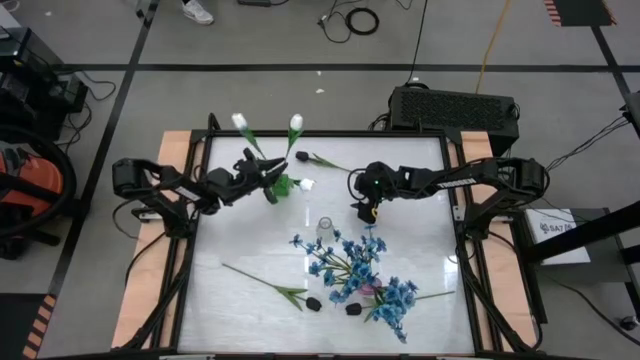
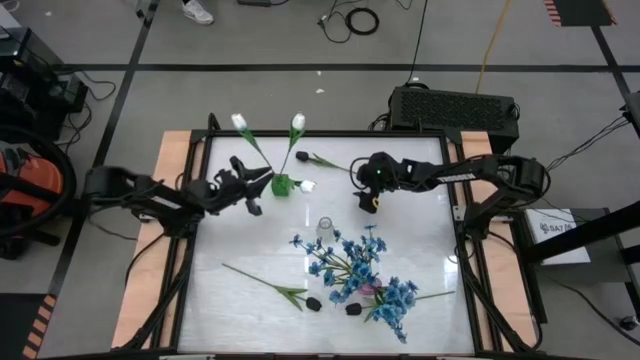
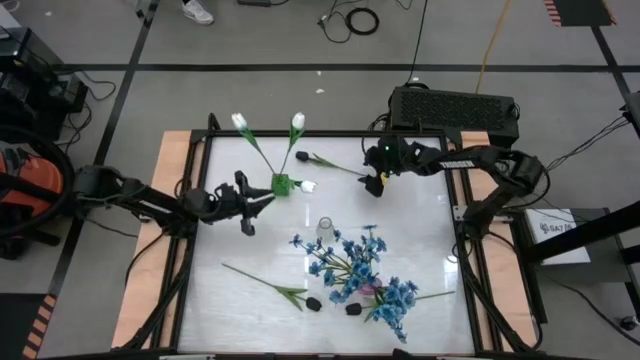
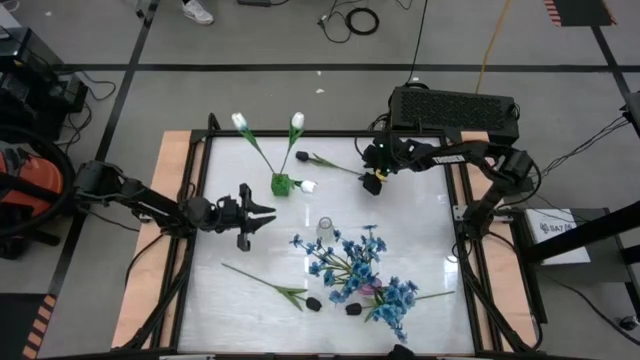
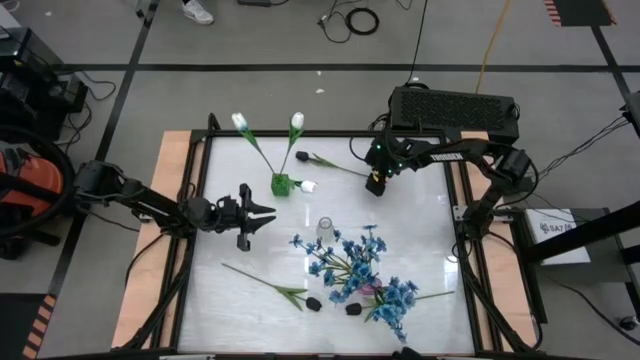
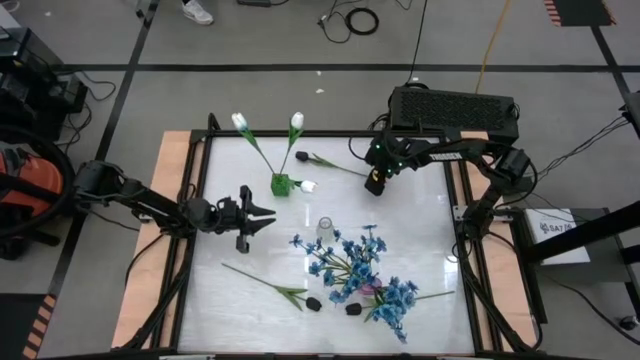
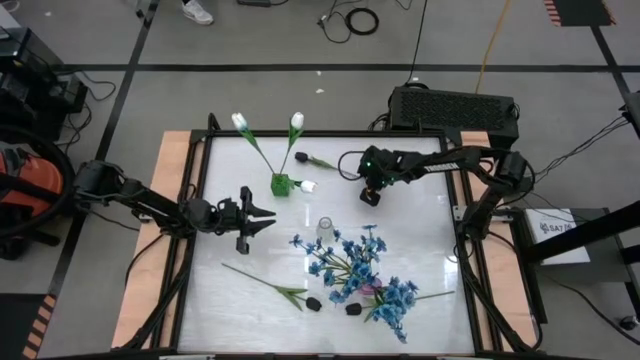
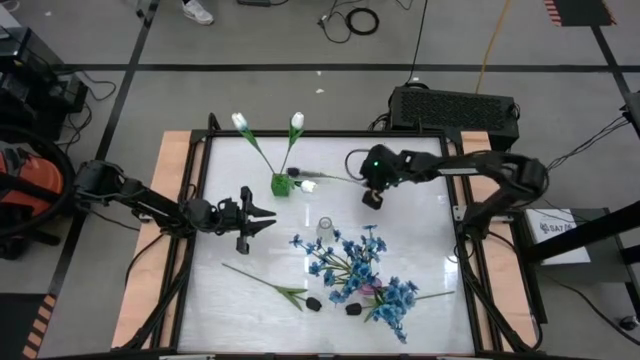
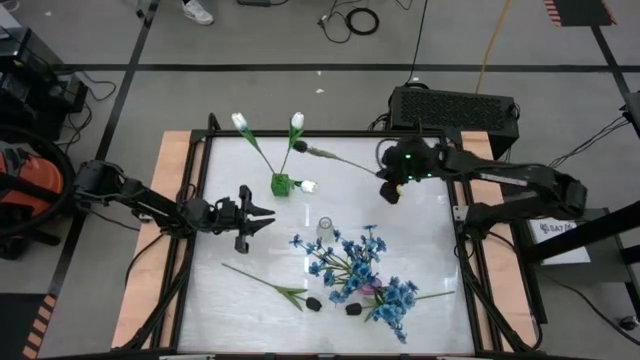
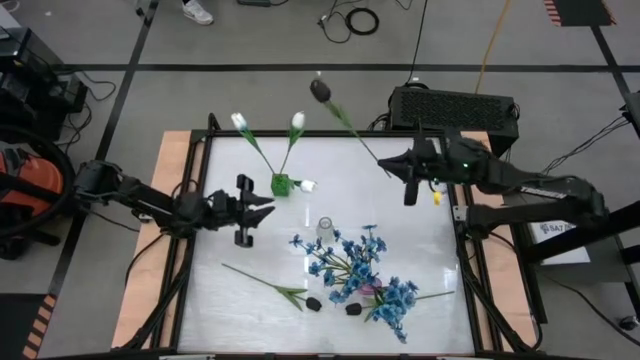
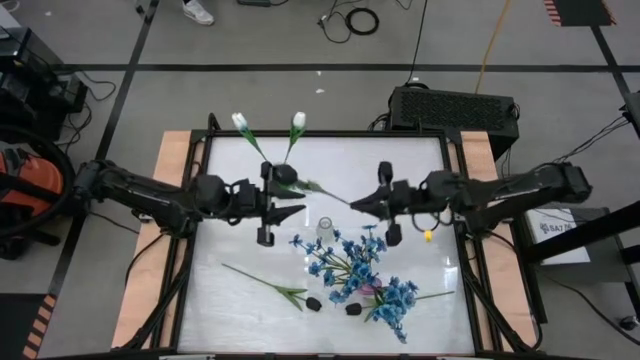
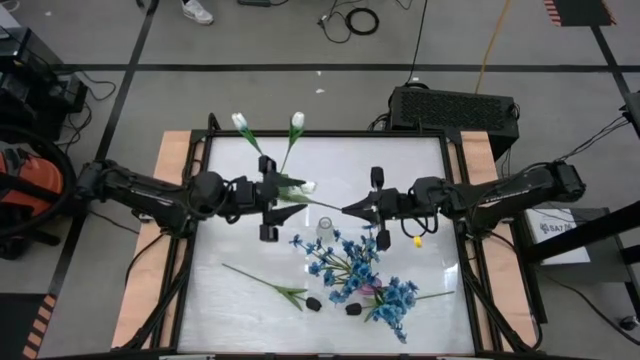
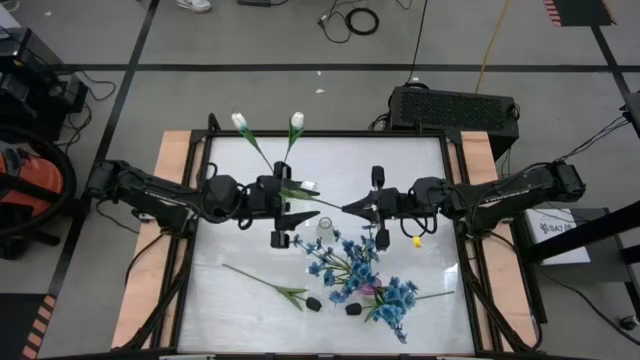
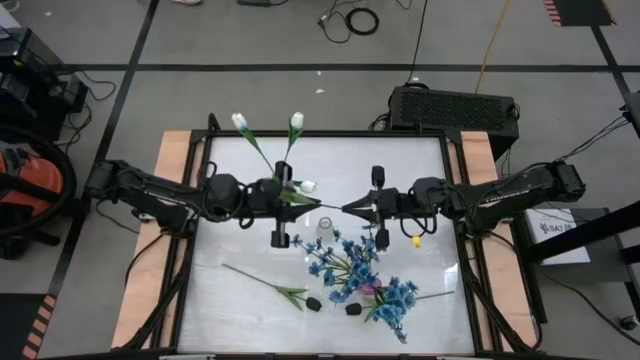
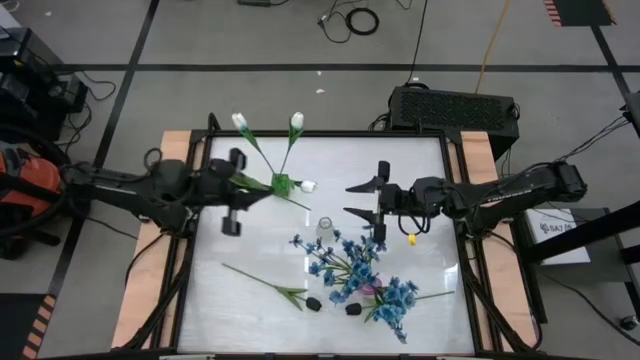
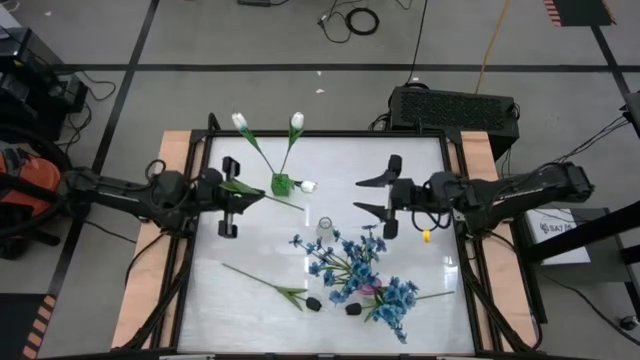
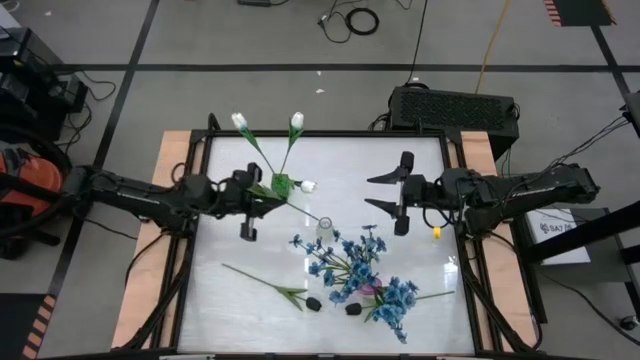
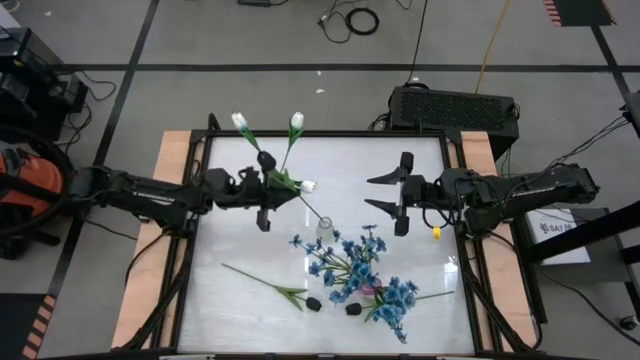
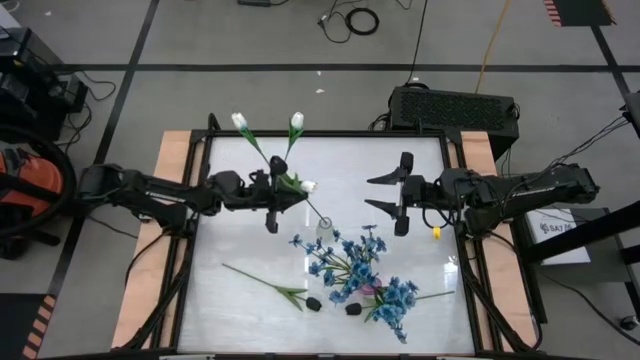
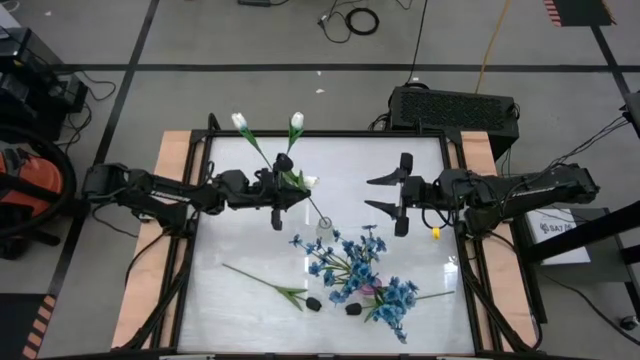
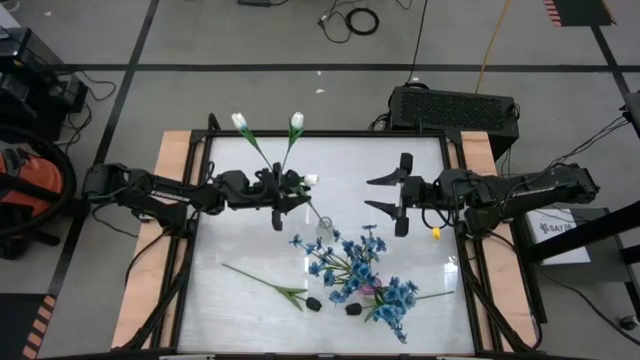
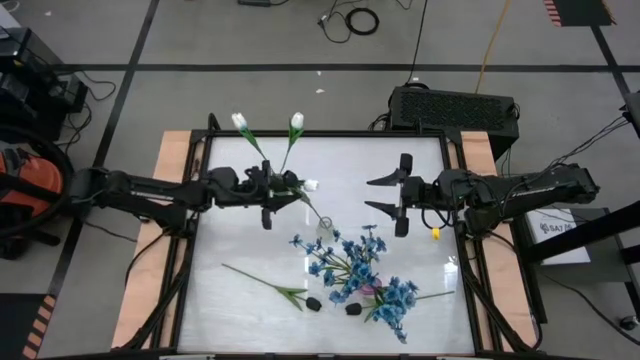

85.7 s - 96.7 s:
Task: Sort flowers into vase by color
Put the top black flower into the transparent vase

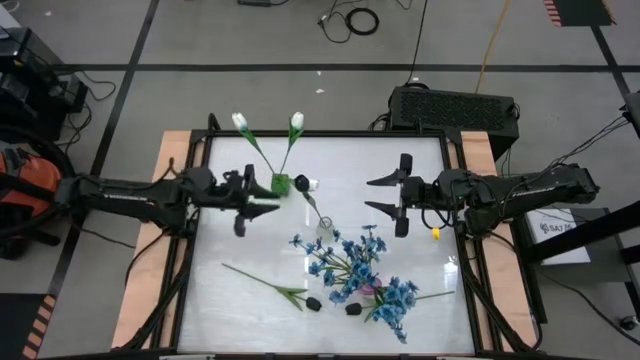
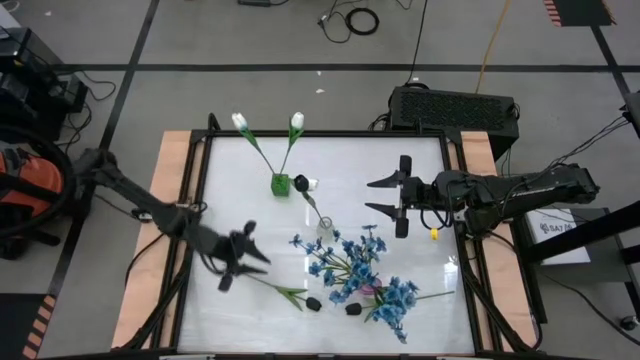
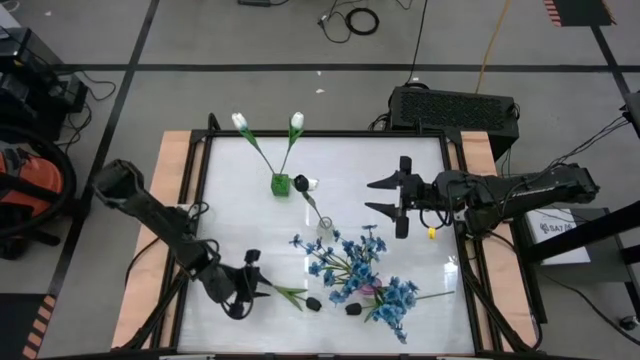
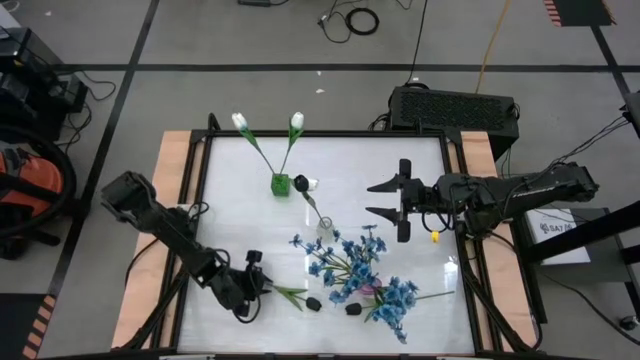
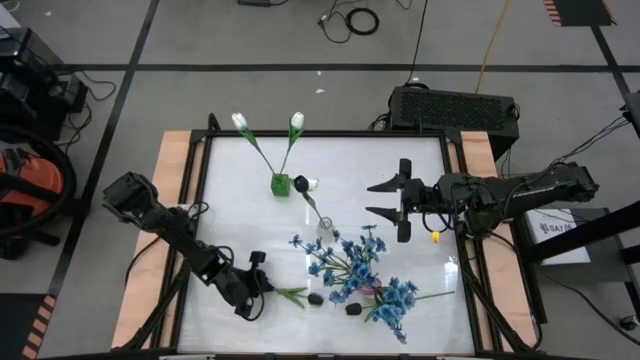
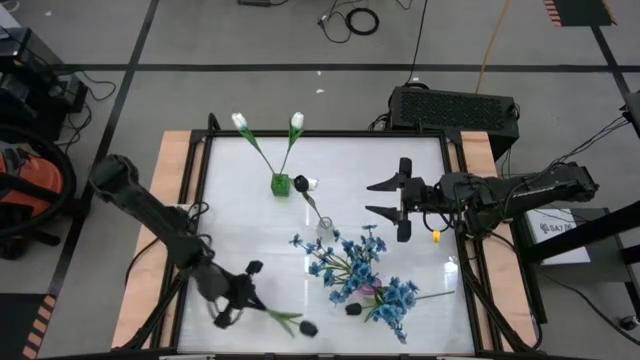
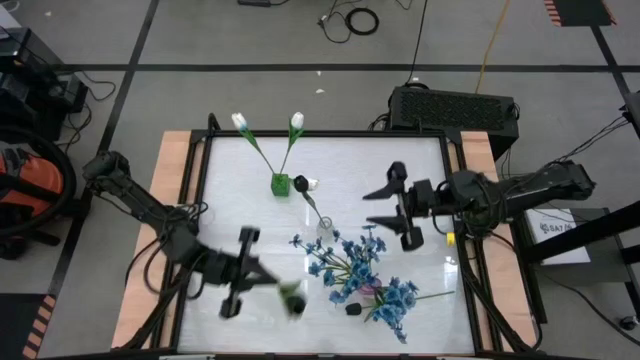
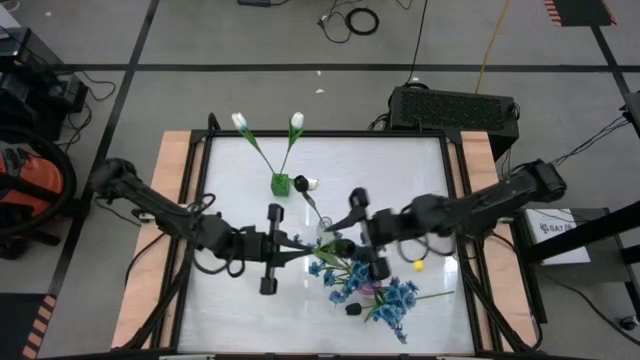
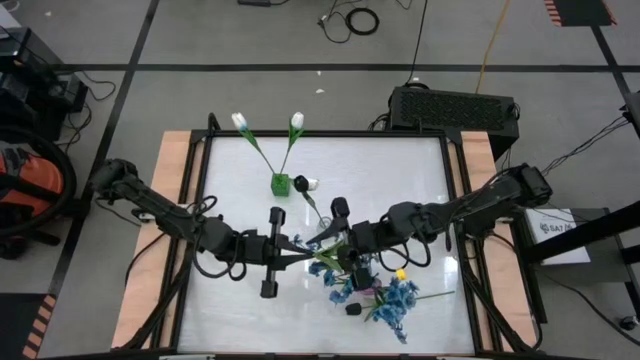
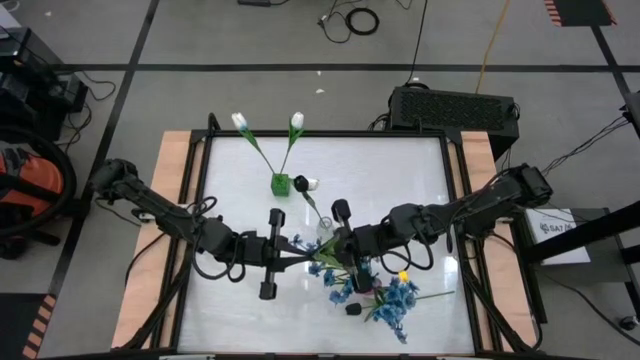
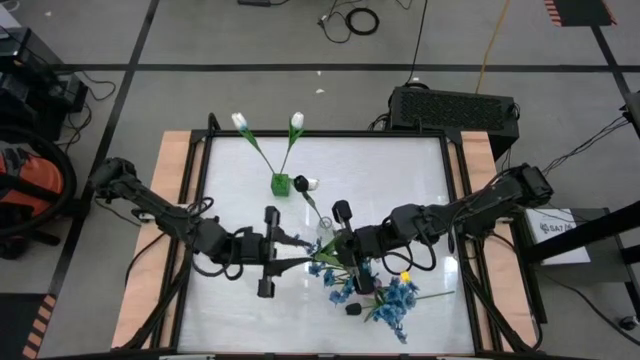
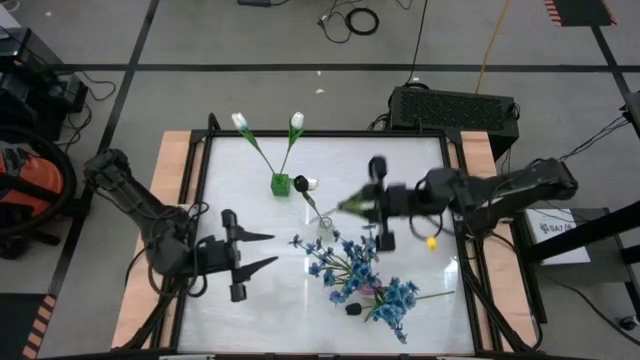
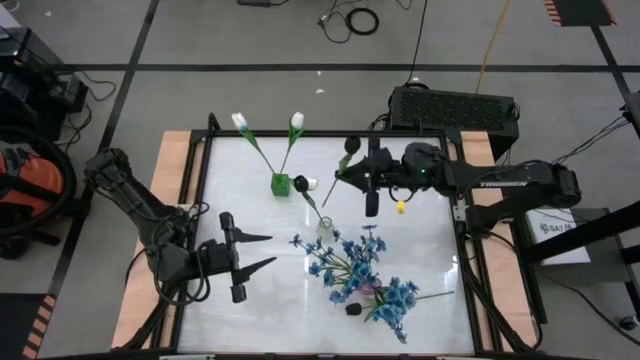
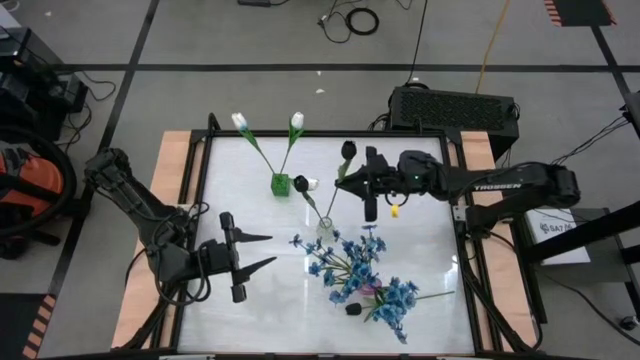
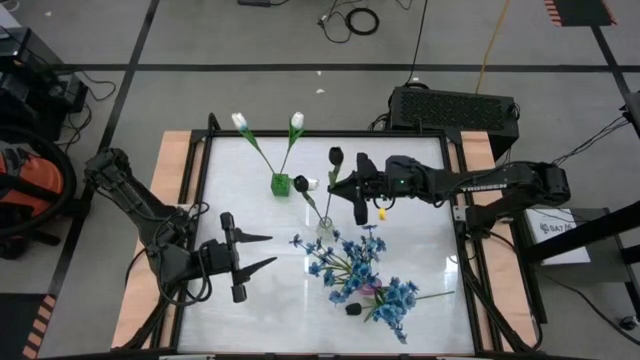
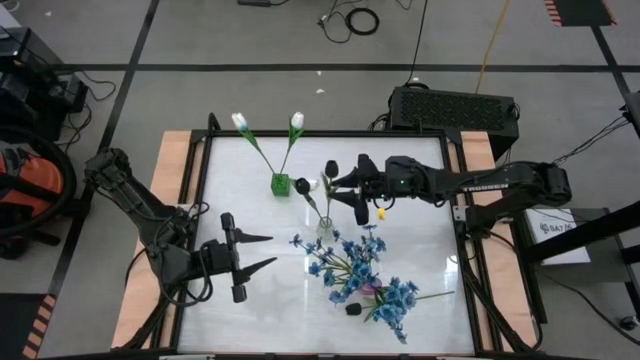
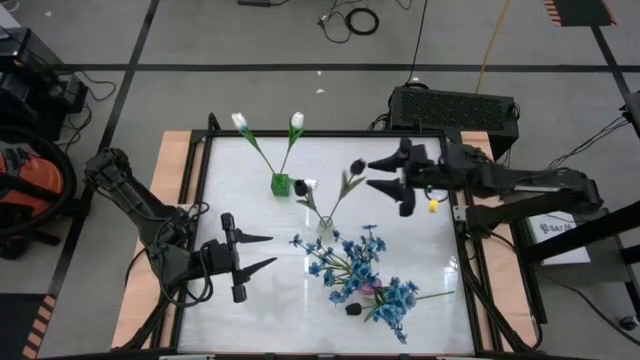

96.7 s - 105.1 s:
Put the left black flower into the transparent vase

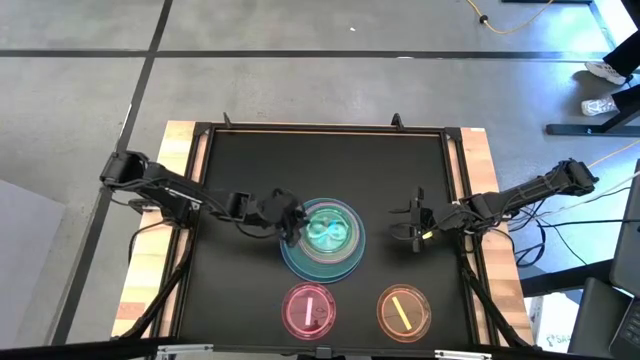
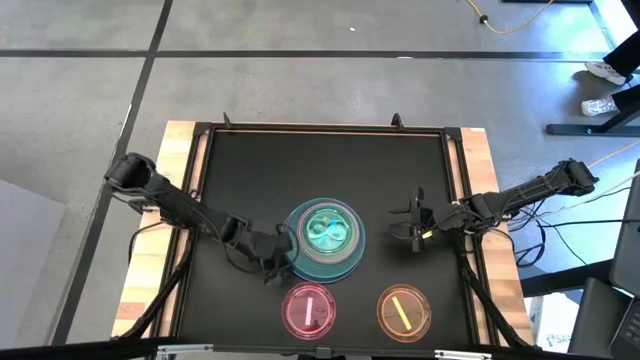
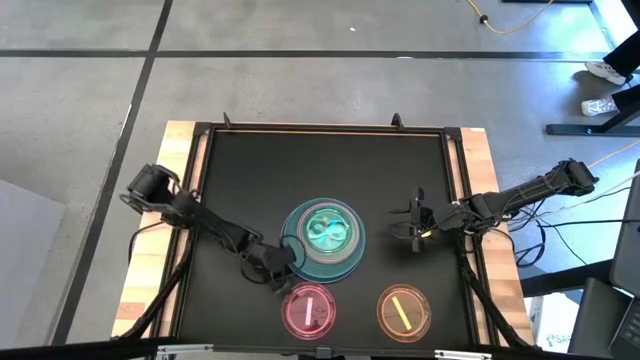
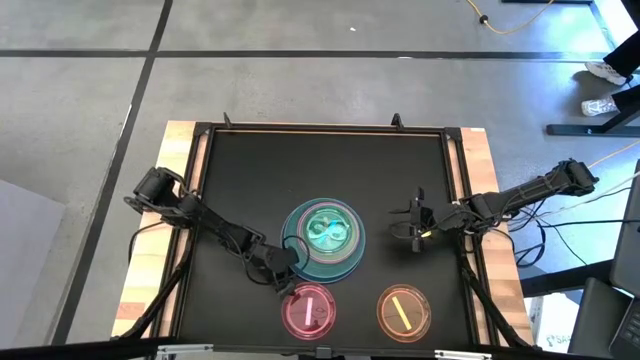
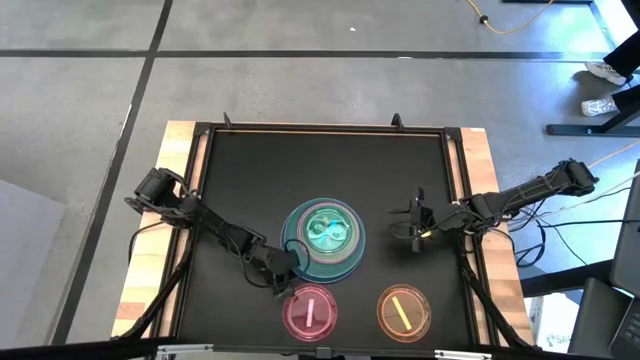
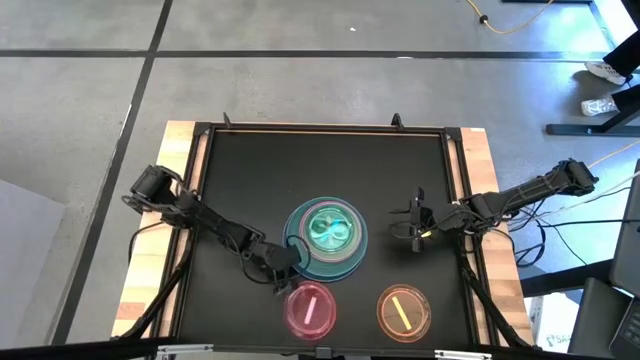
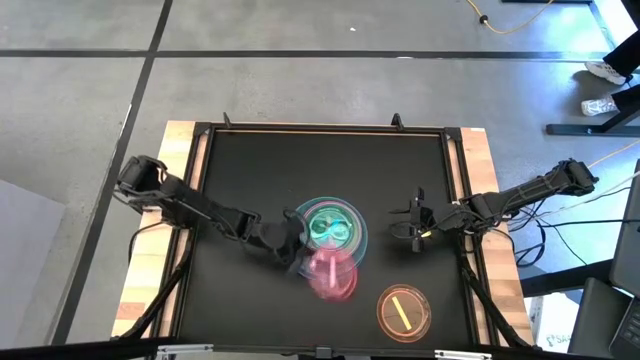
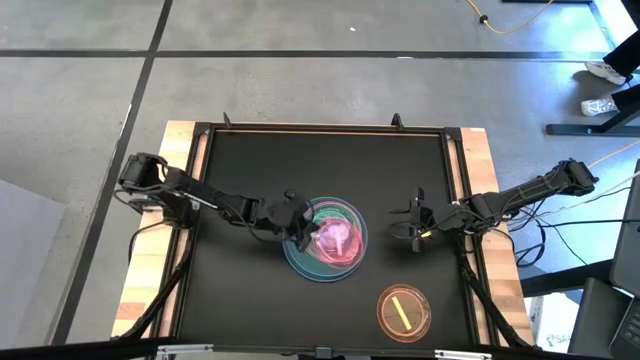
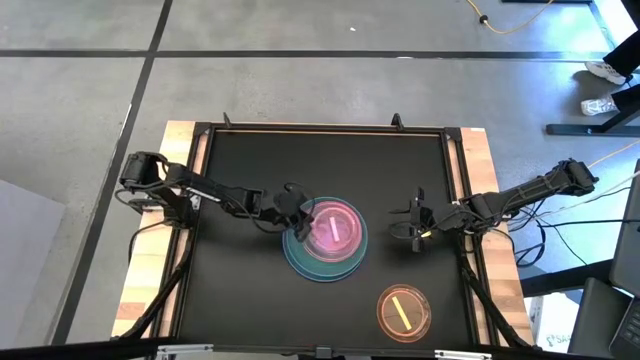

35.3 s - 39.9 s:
Task: Stack plastic plates
Stack the small red plate on the small dark blue plate
